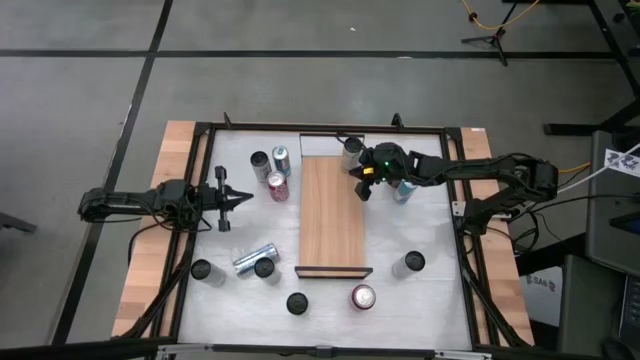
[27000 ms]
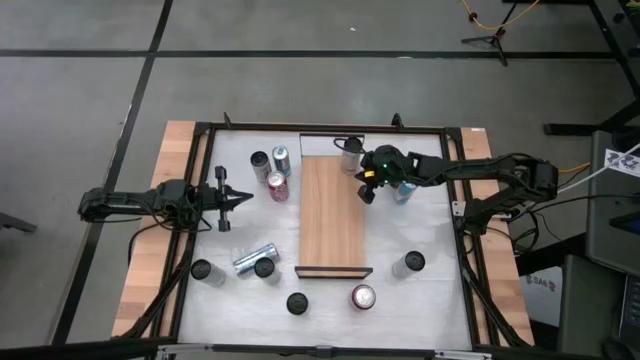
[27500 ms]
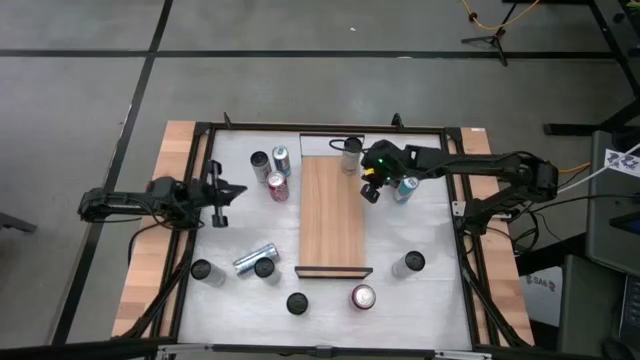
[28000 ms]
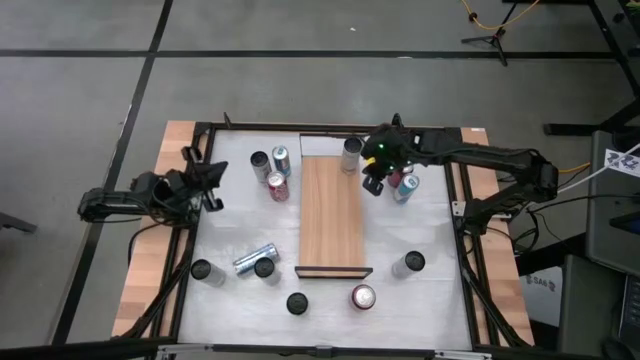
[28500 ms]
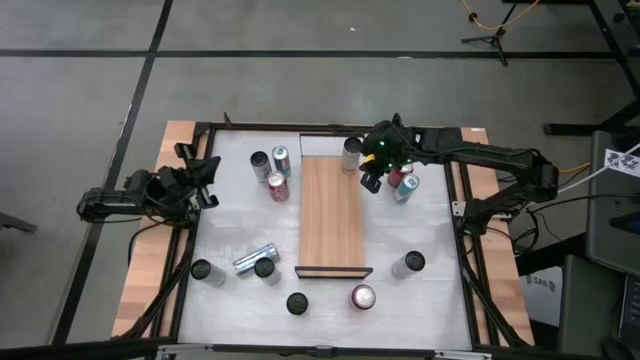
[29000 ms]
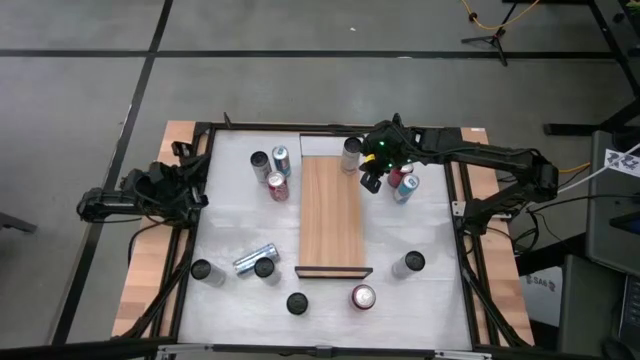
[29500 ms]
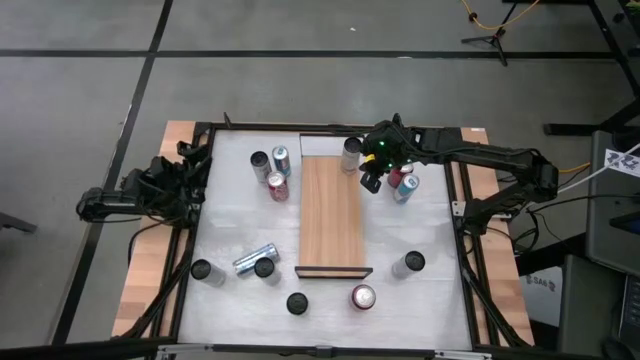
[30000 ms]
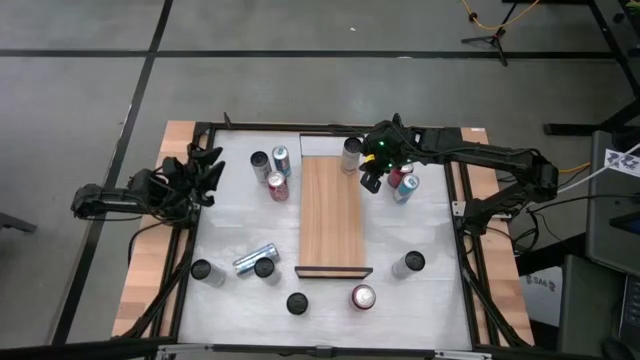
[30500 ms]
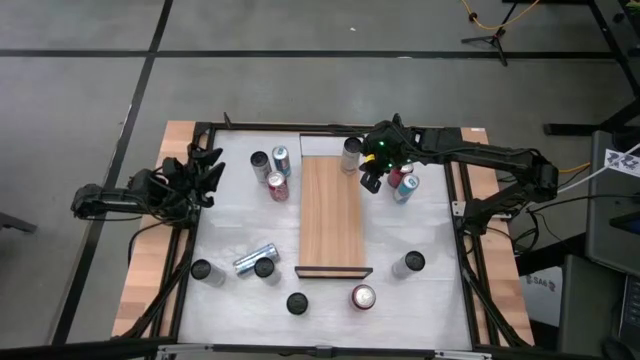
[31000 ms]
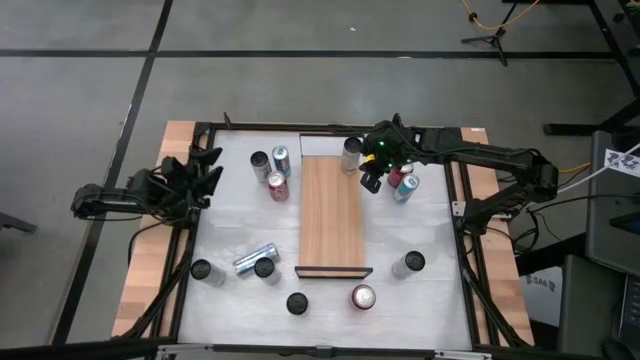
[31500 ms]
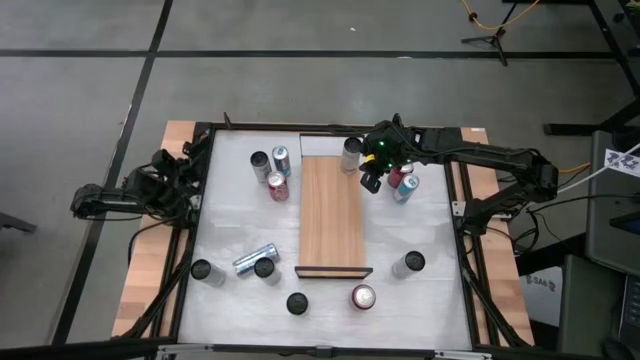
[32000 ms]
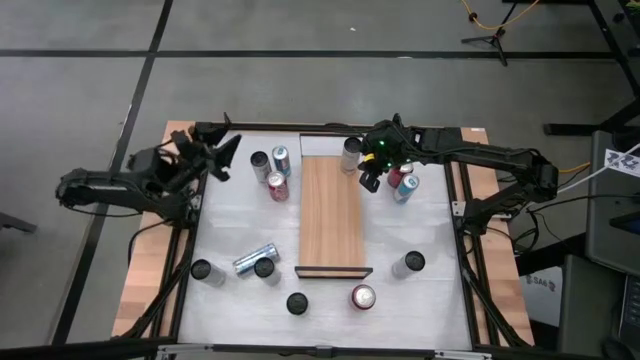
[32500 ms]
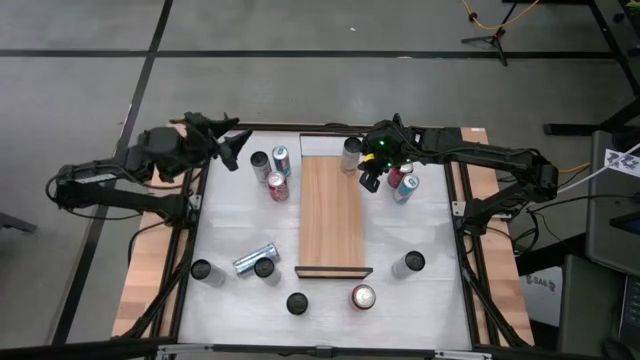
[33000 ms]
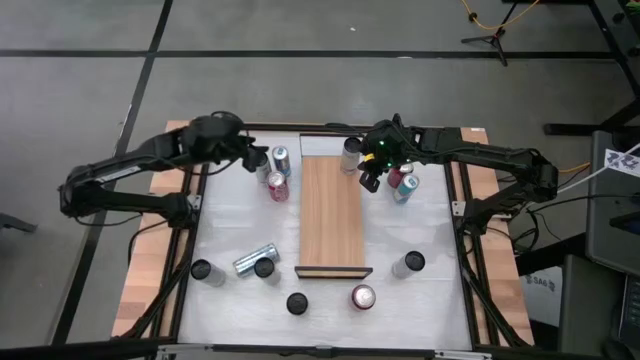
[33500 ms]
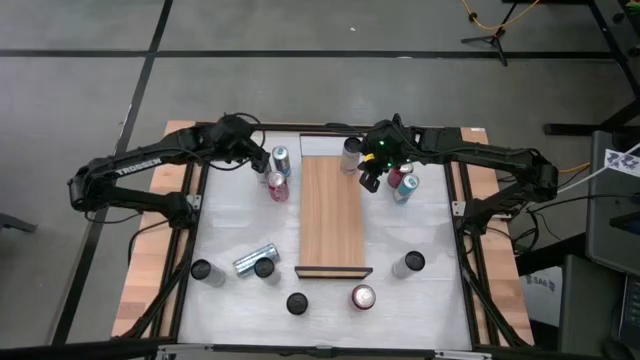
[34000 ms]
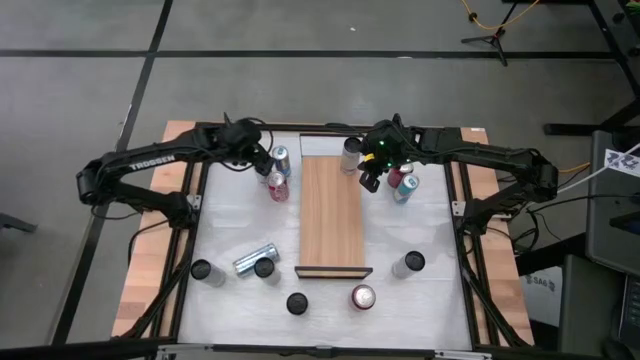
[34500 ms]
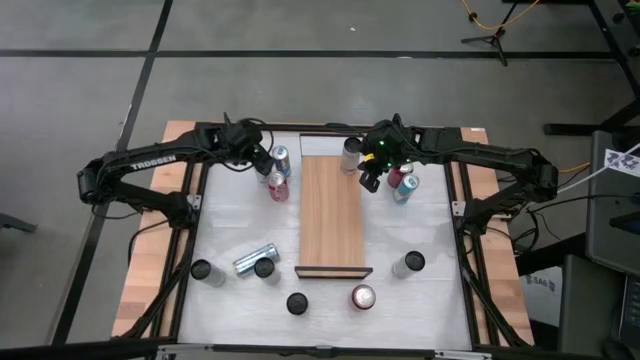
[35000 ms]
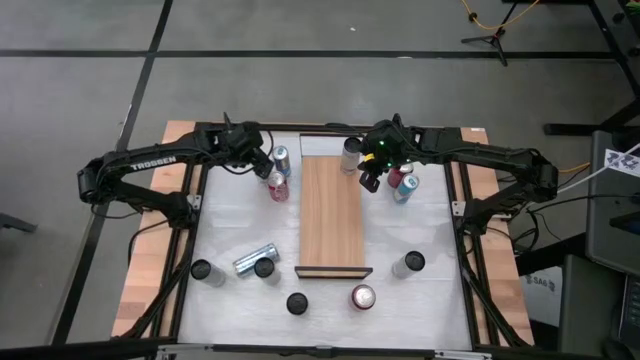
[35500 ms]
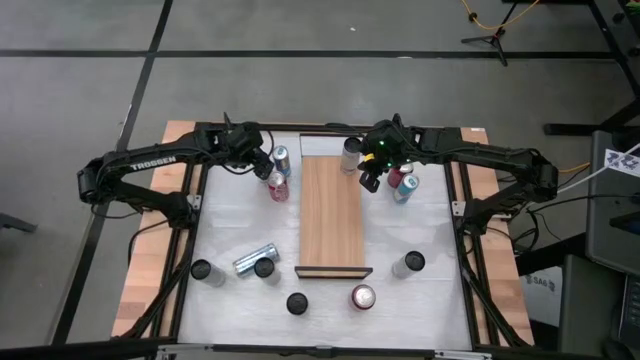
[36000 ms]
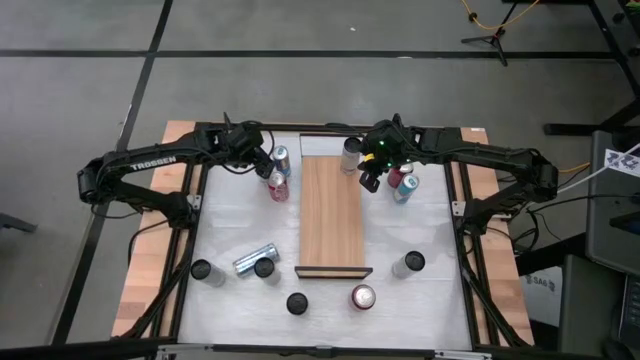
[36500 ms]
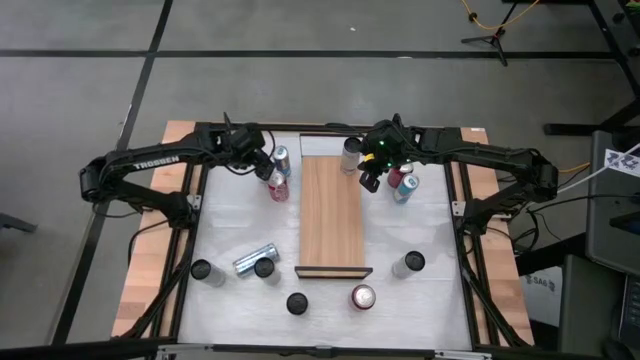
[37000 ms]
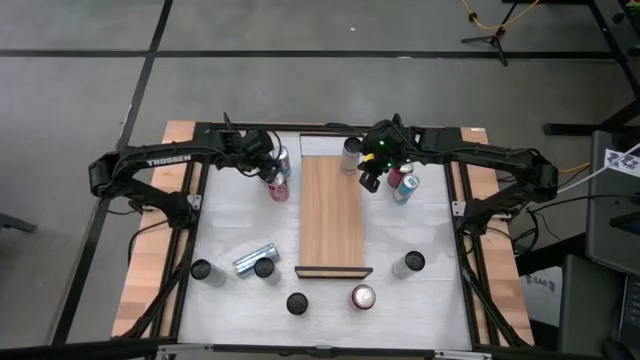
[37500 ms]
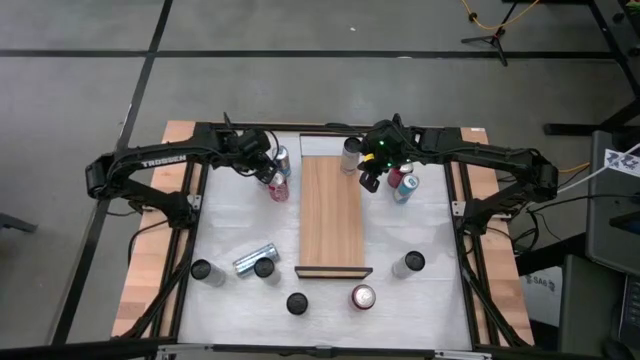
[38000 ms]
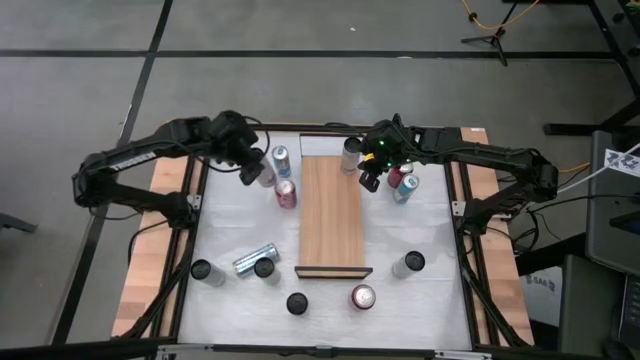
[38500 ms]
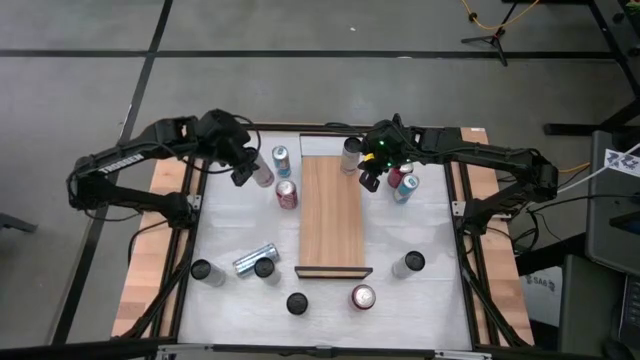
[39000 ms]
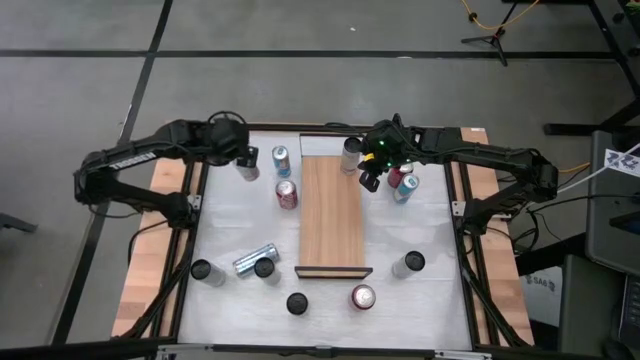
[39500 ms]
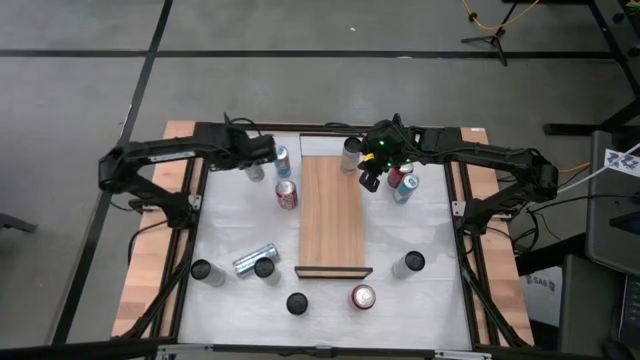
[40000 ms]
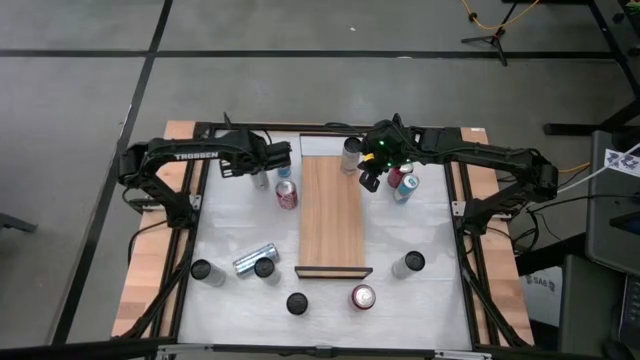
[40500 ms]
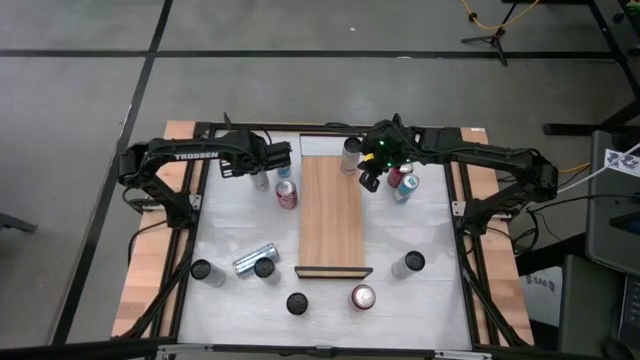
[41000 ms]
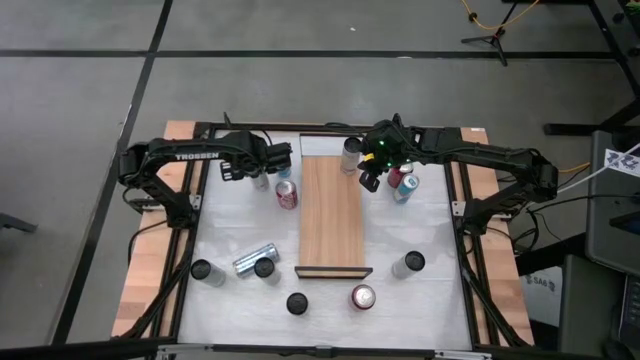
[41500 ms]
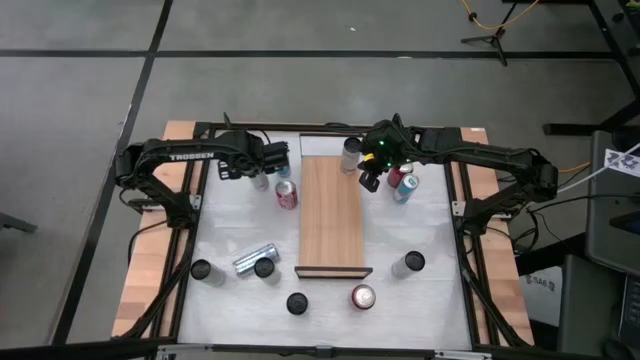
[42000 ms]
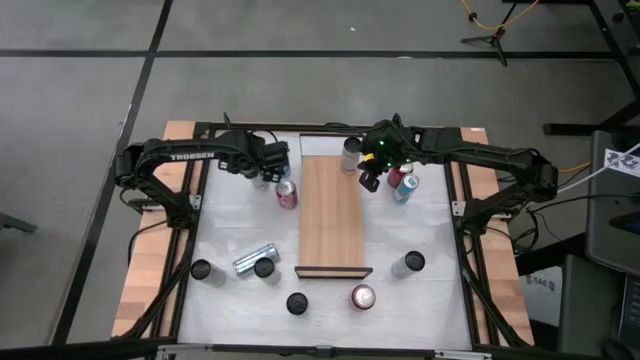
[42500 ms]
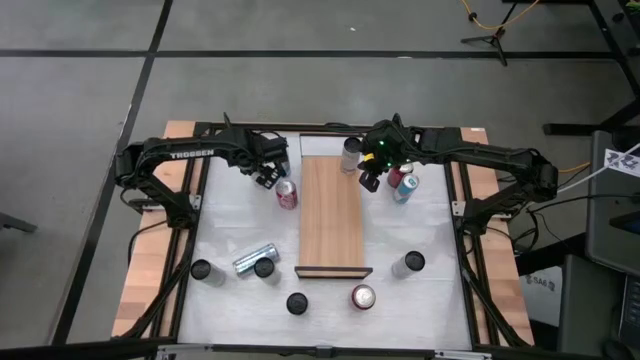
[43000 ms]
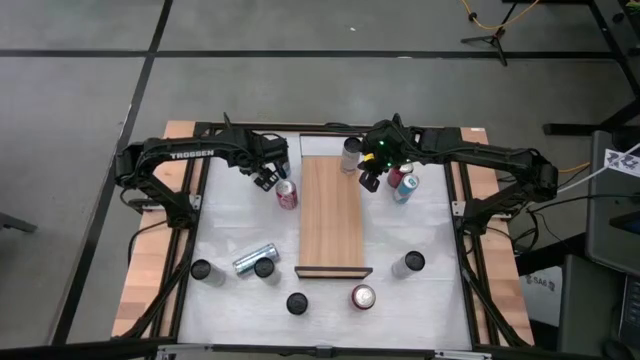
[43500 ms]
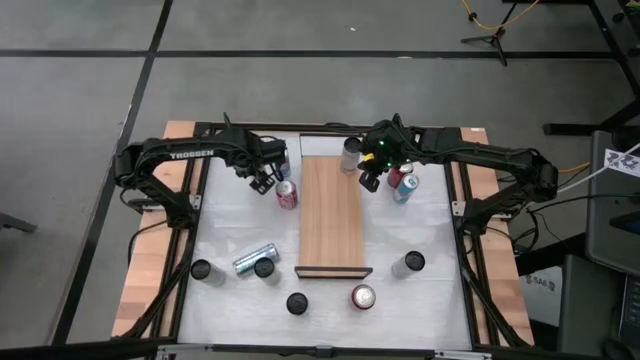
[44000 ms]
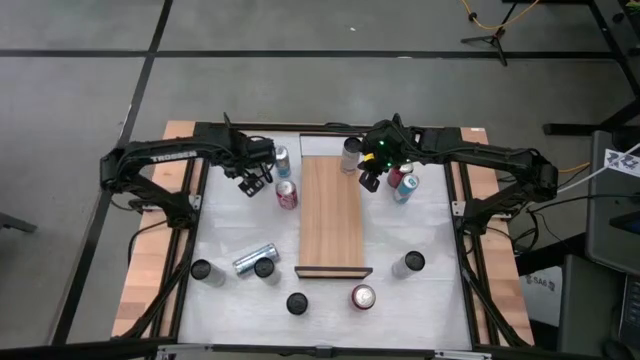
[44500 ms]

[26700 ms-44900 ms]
Task: Place canned beverage on shelf
Put the white pink soda can on the shelf aligned with the other white pink soda can
